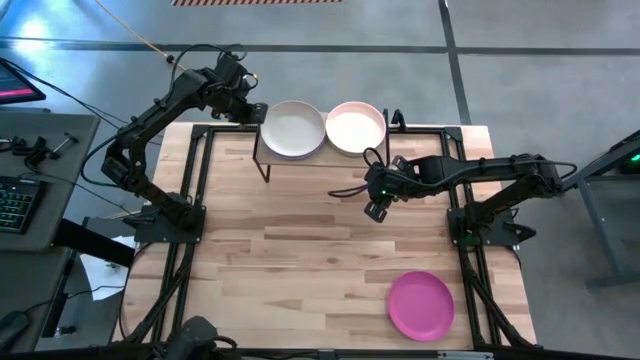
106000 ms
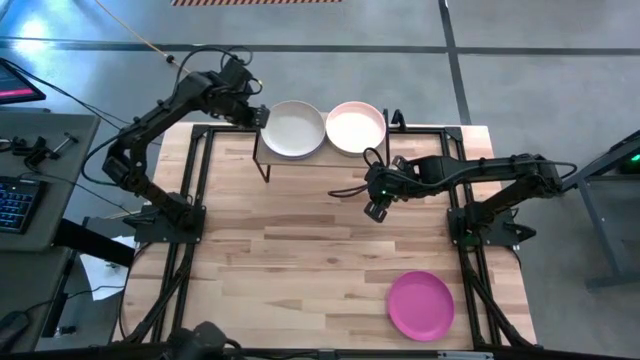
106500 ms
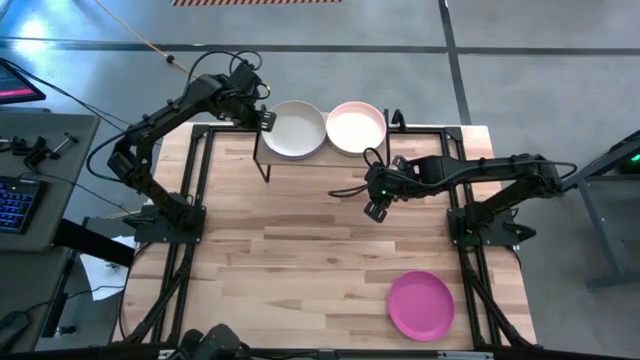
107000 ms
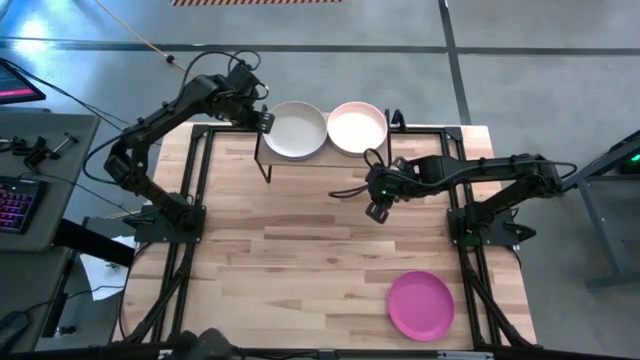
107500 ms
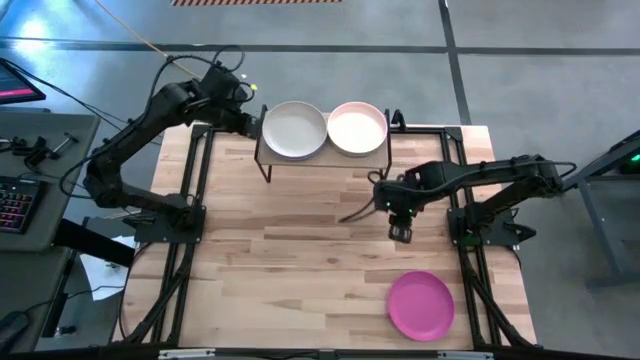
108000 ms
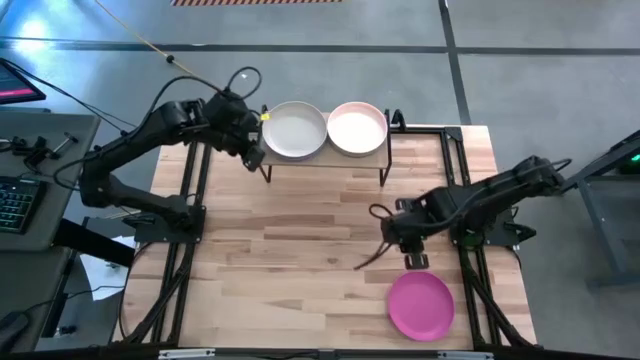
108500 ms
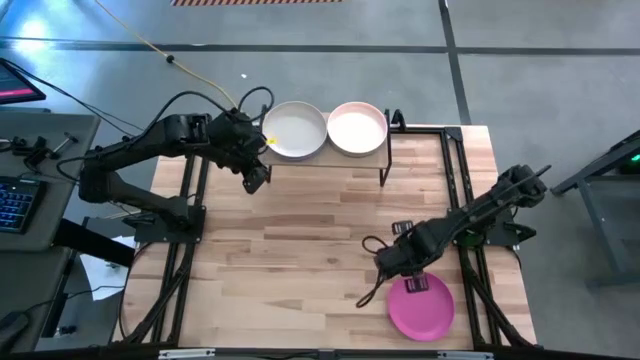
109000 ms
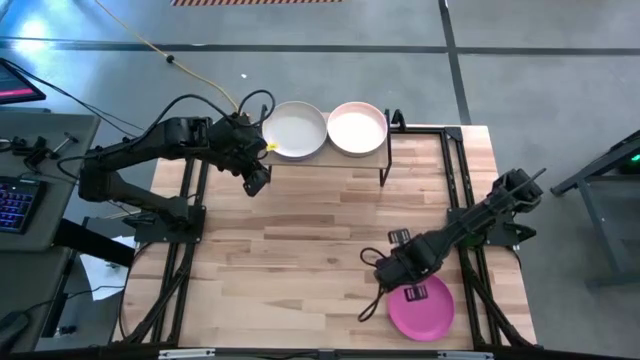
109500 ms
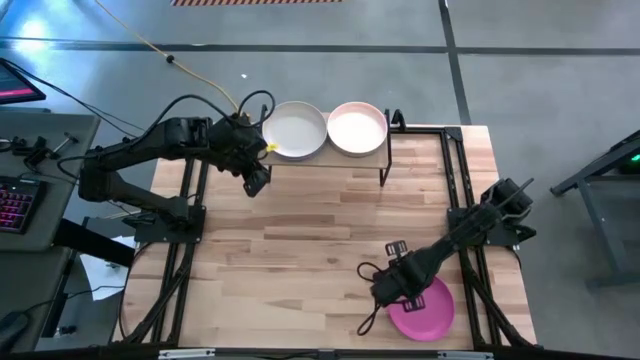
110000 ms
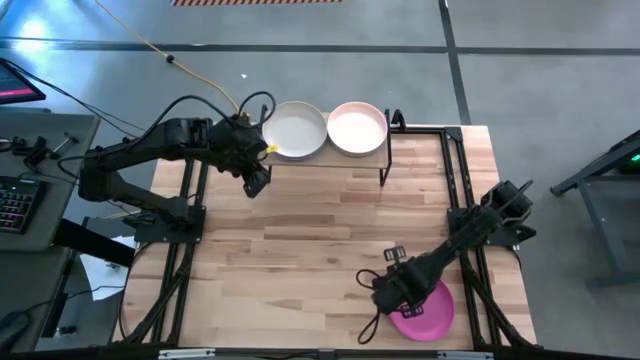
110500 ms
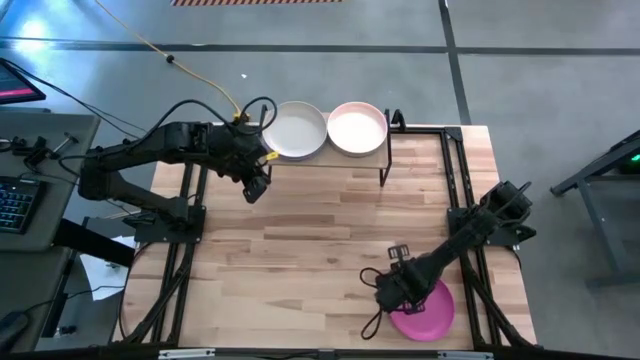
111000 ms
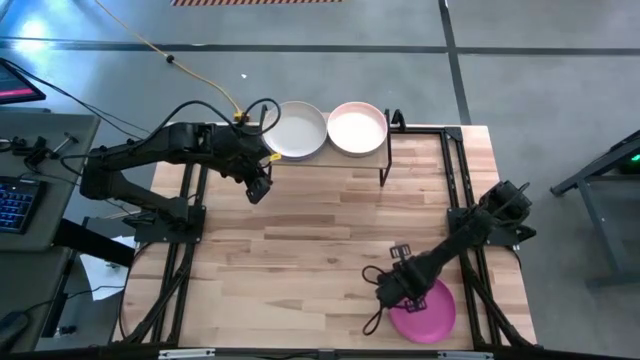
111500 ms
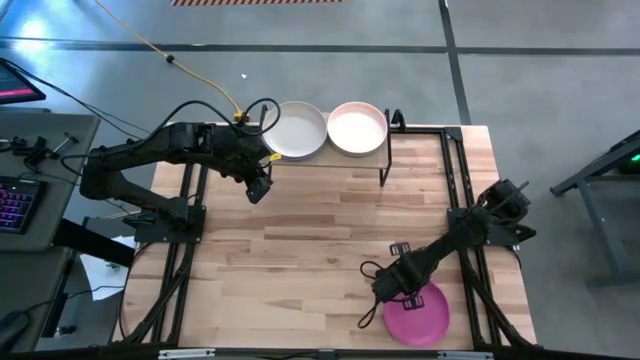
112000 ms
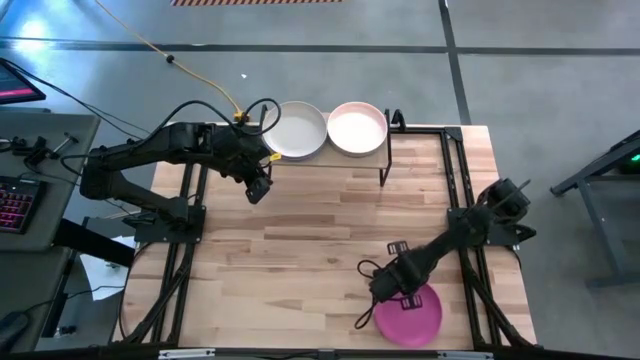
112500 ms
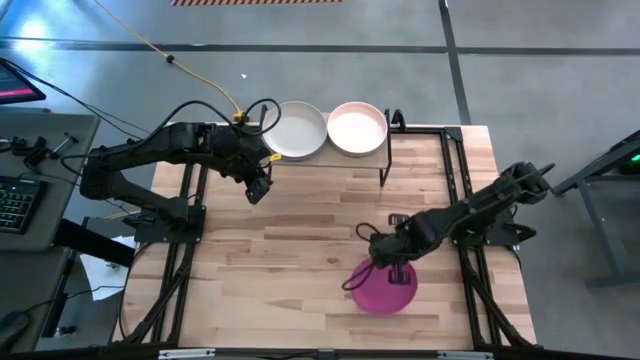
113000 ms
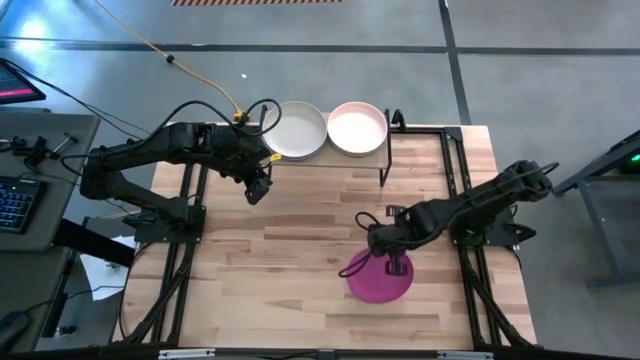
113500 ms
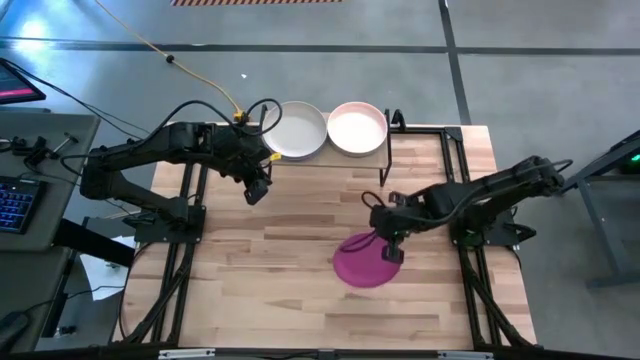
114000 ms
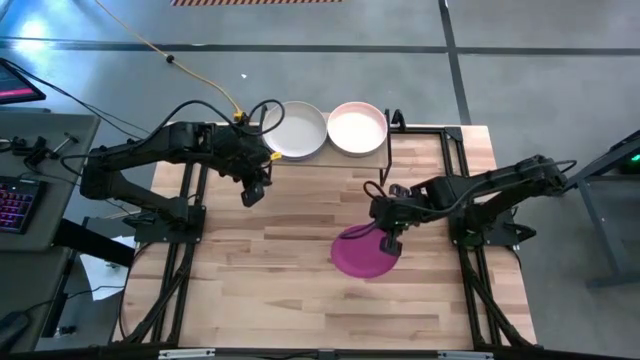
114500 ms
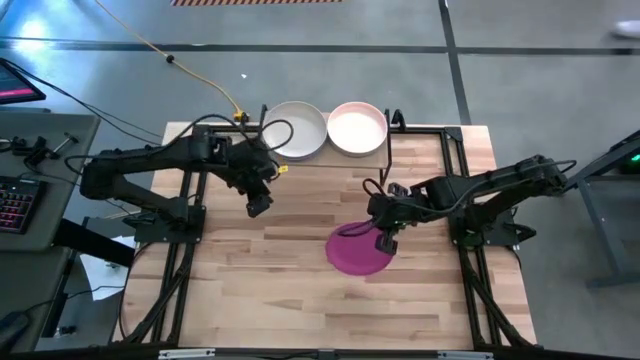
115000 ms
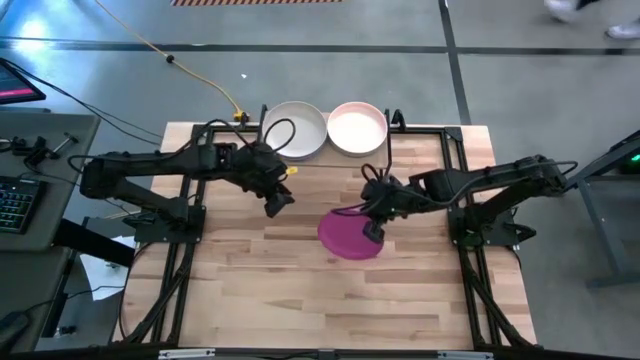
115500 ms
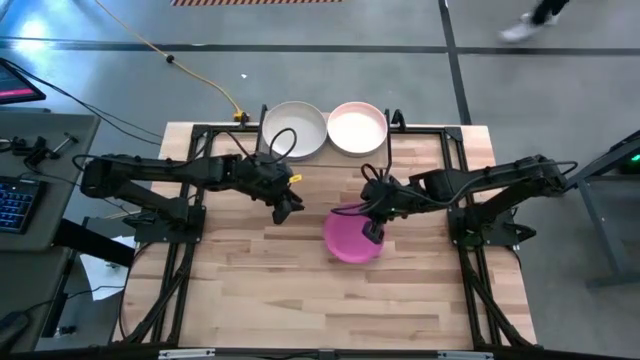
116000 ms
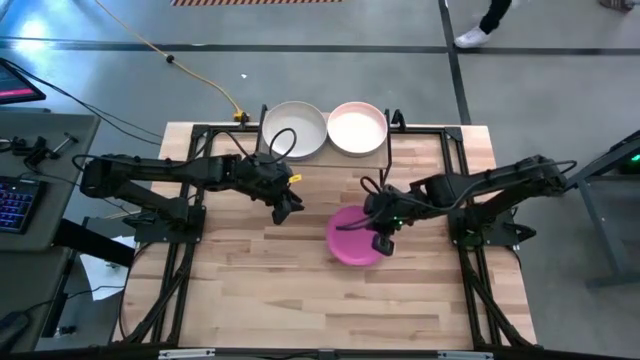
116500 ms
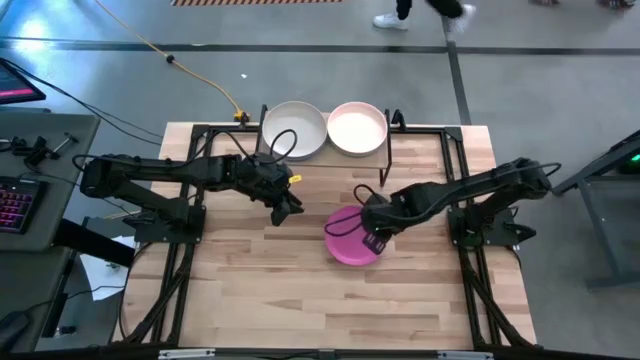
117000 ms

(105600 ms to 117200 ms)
Task: Place and stack plates onto a shelf
Stack the pink plate into the light gray plate on the shelf

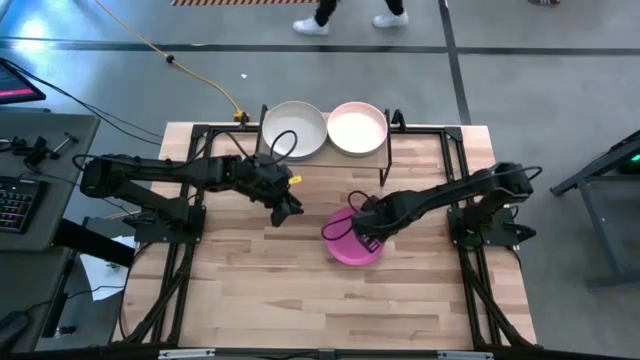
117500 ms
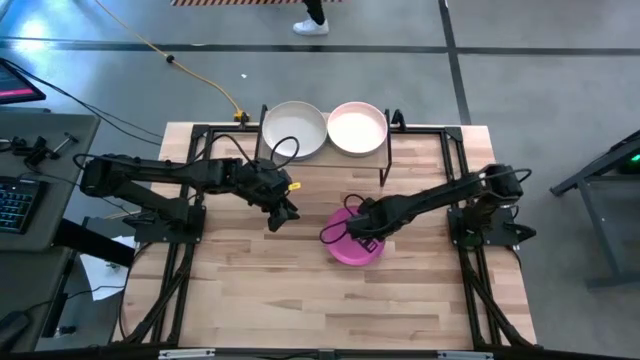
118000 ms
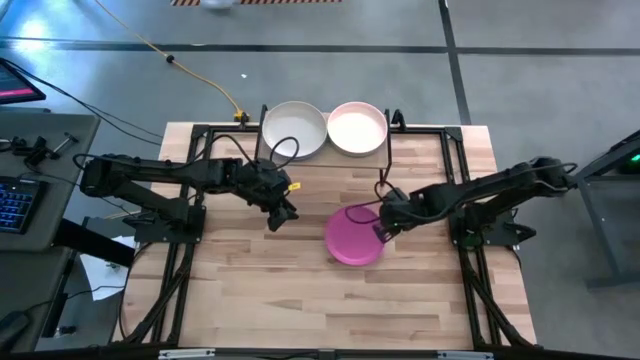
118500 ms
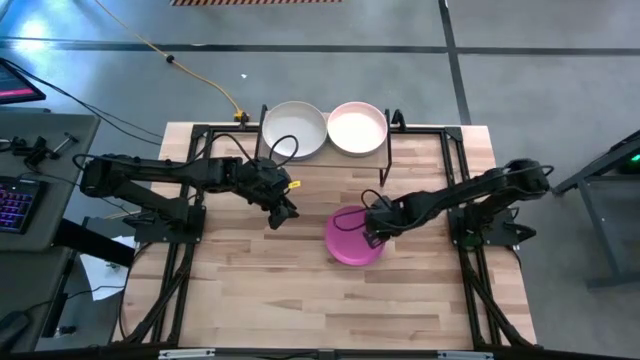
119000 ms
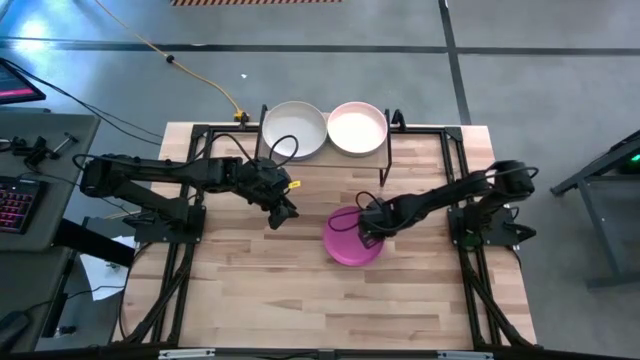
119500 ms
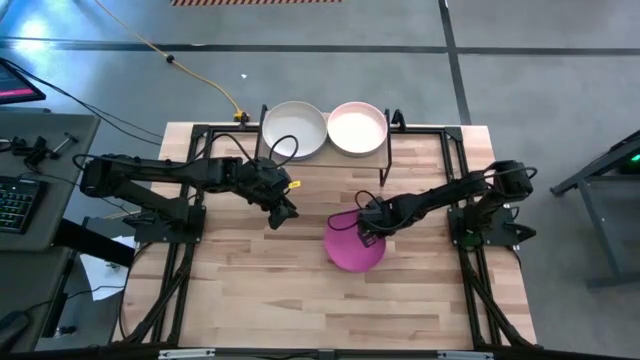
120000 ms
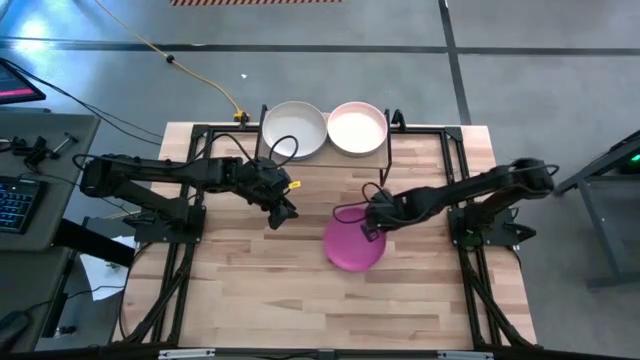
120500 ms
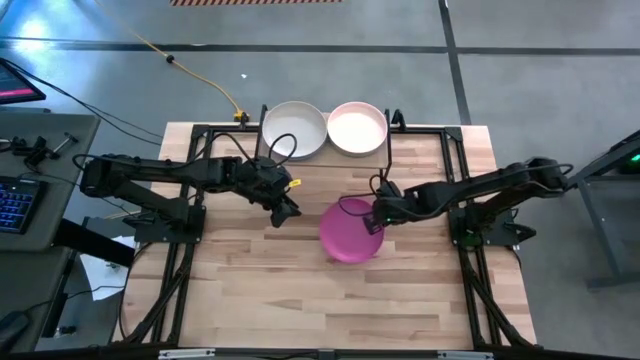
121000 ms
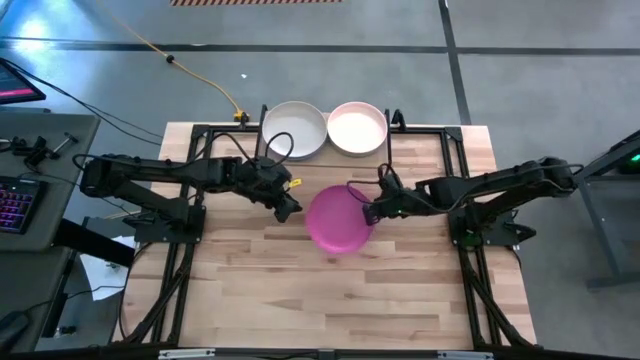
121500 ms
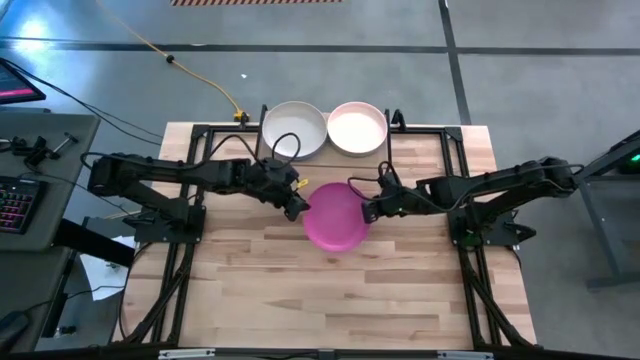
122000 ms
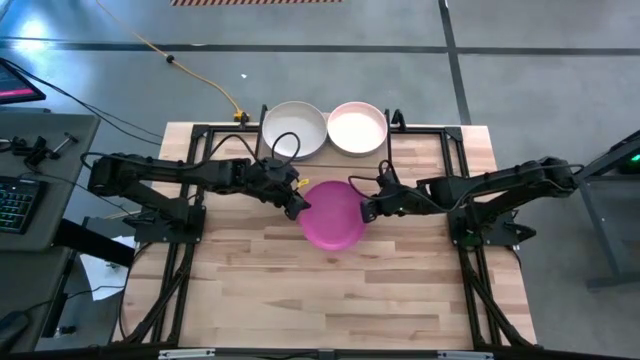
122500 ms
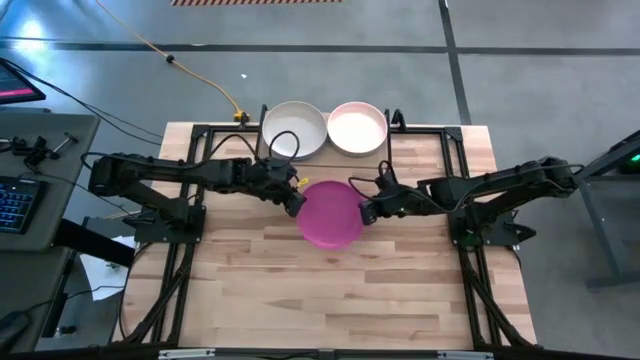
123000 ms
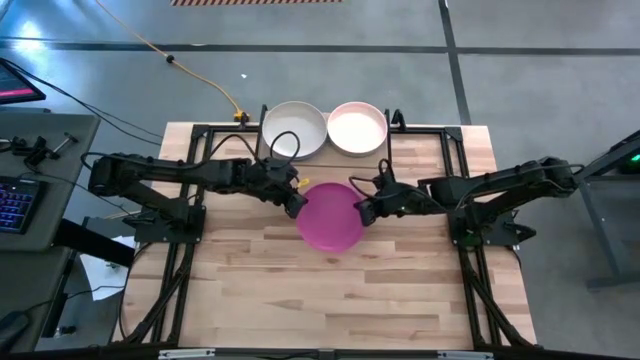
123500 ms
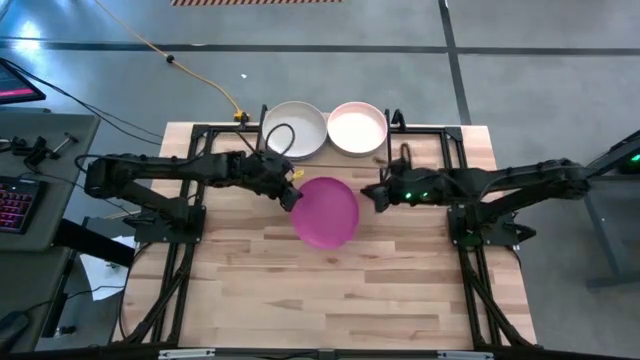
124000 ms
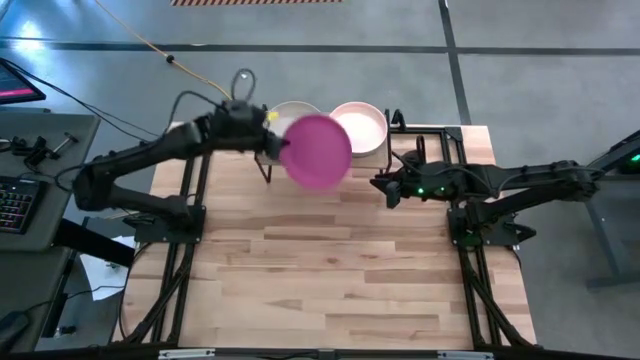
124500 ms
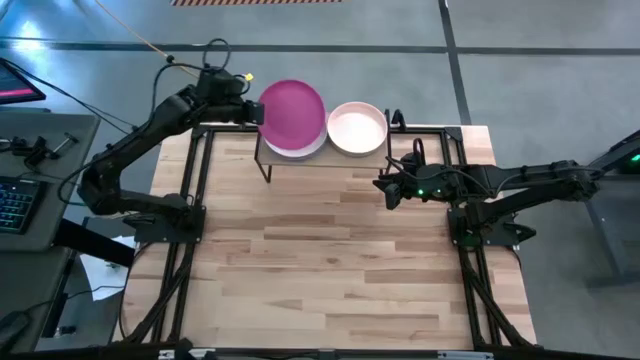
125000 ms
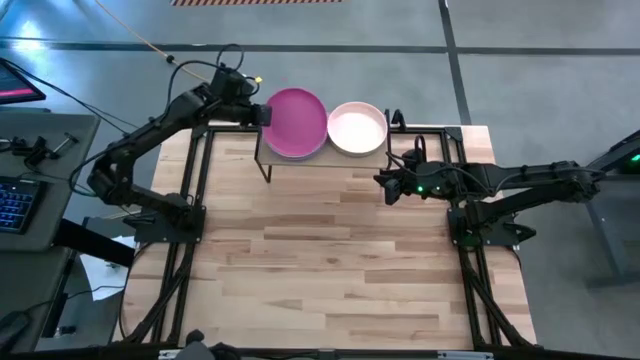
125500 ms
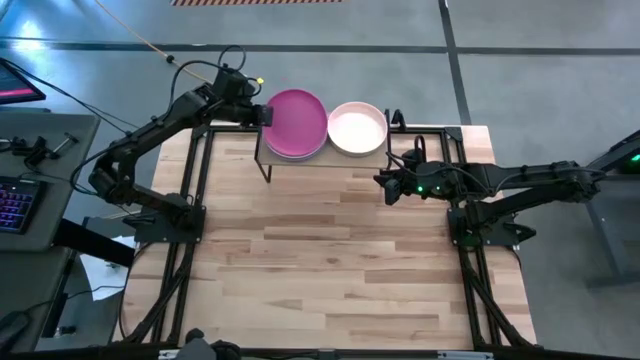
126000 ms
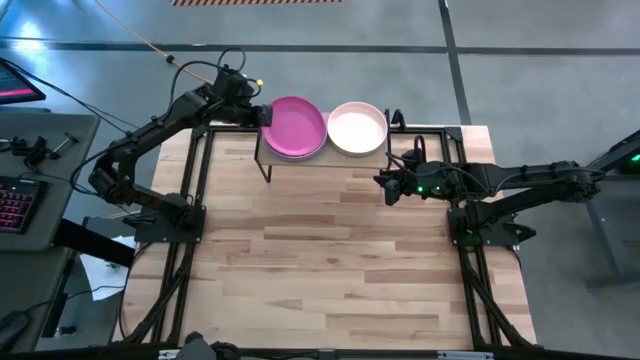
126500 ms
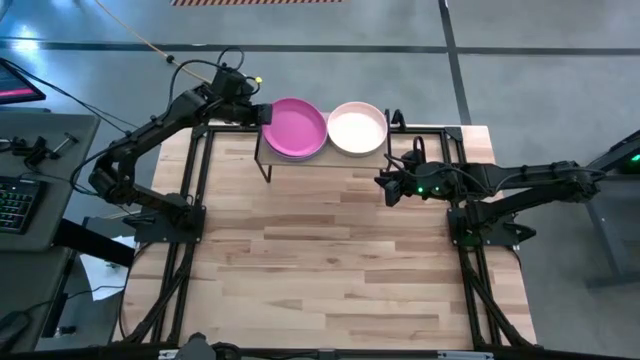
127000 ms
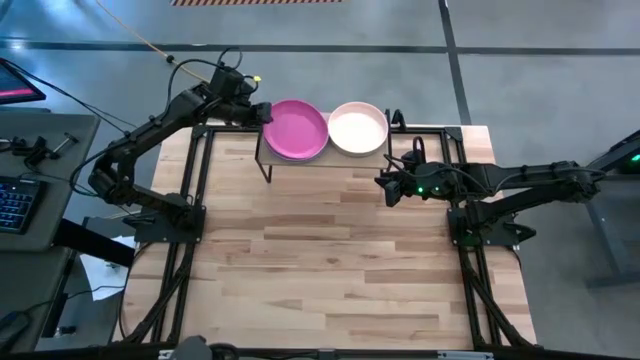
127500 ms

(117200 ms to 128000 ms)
Stack the pink plate into the light gray plate on the shelf
